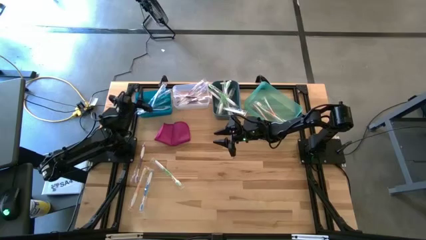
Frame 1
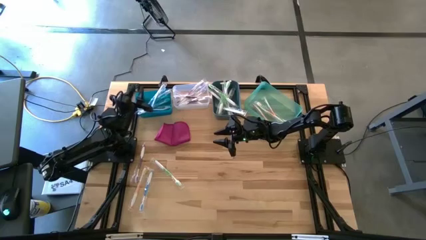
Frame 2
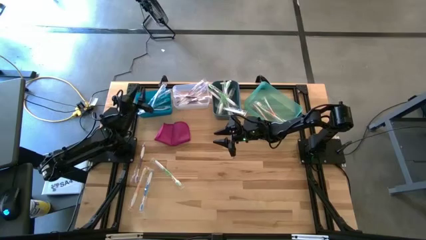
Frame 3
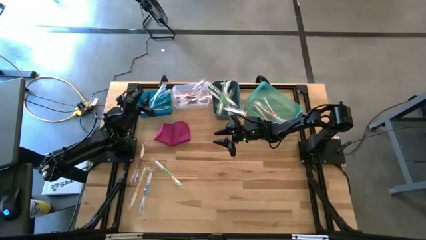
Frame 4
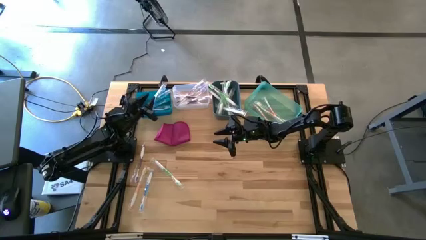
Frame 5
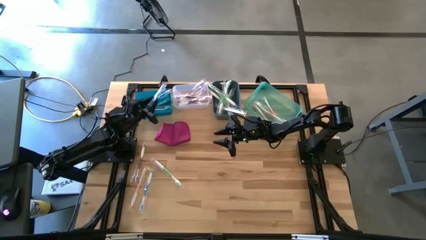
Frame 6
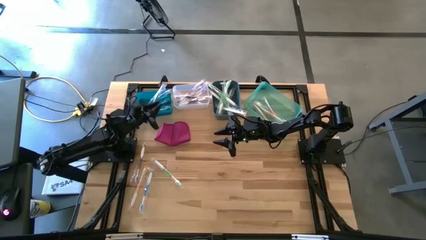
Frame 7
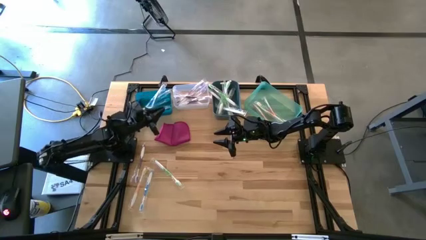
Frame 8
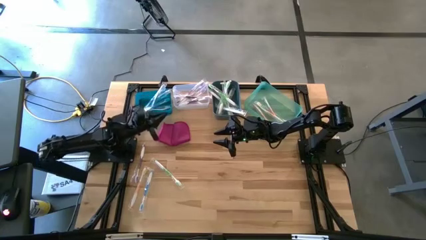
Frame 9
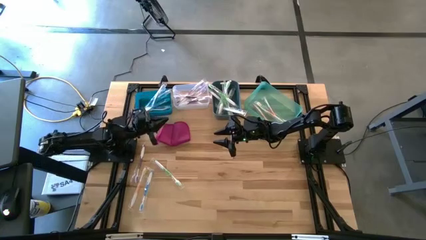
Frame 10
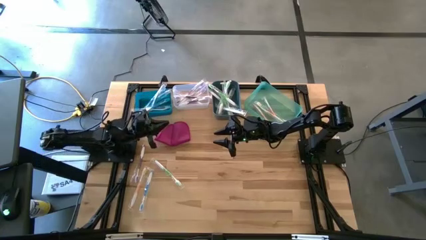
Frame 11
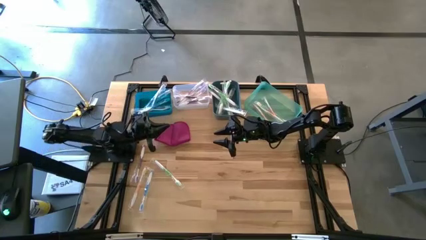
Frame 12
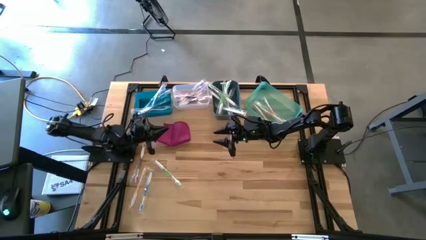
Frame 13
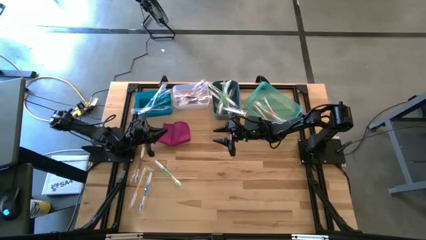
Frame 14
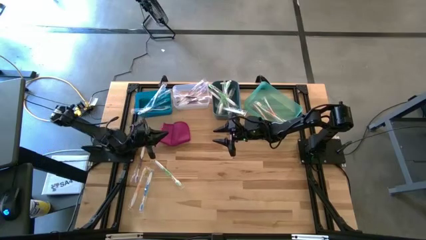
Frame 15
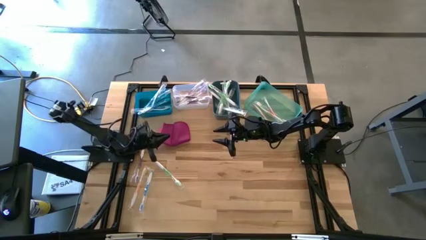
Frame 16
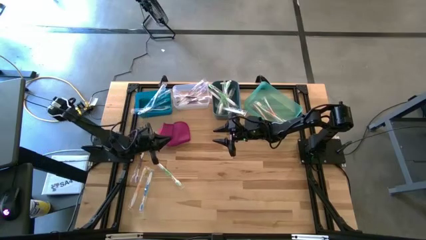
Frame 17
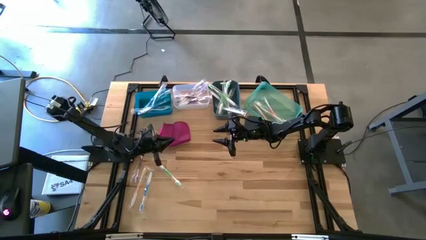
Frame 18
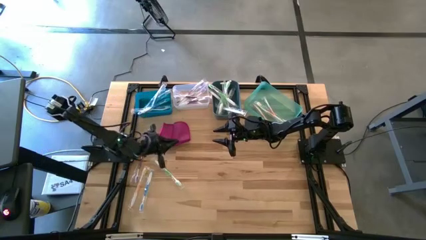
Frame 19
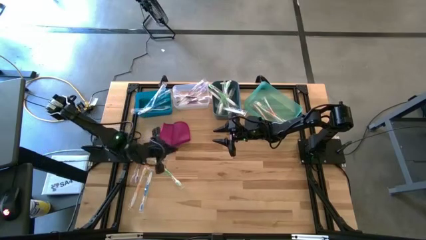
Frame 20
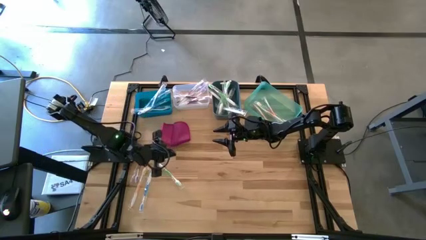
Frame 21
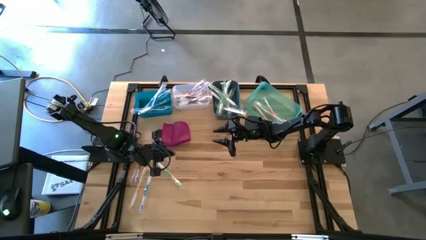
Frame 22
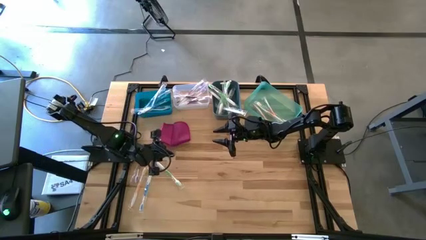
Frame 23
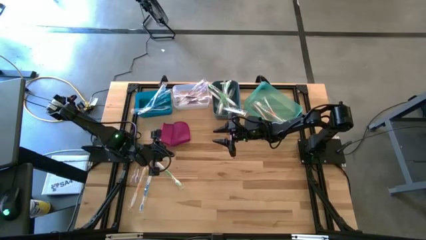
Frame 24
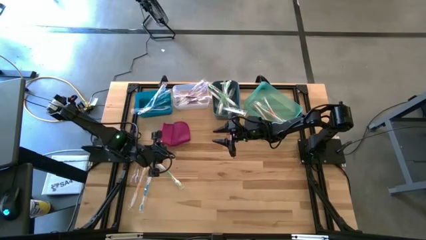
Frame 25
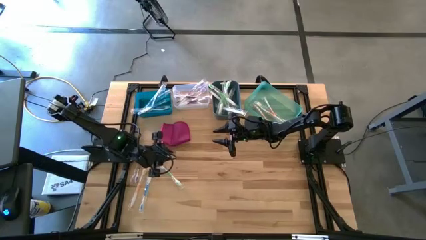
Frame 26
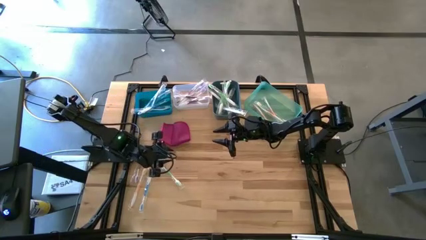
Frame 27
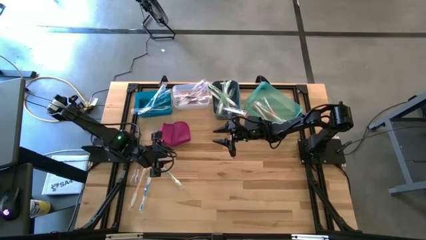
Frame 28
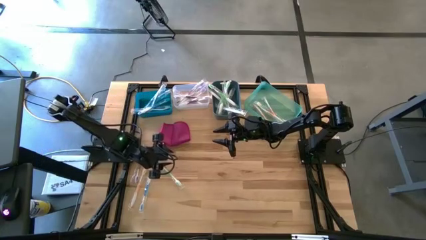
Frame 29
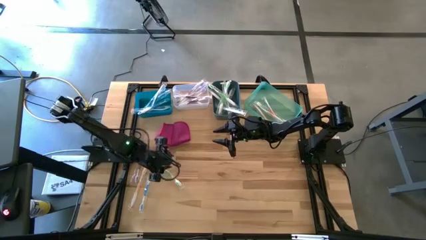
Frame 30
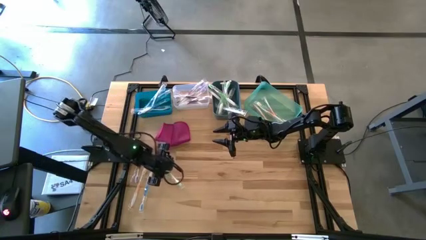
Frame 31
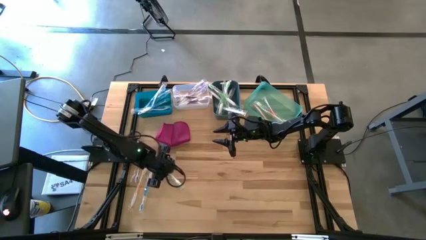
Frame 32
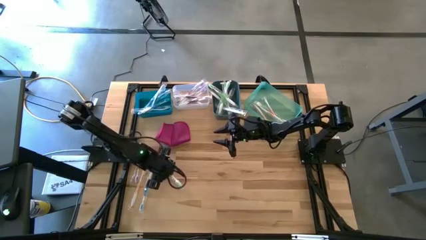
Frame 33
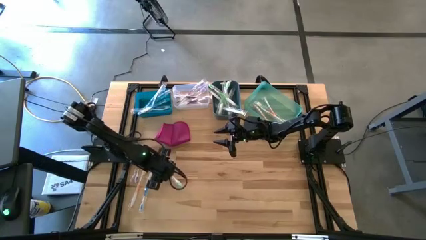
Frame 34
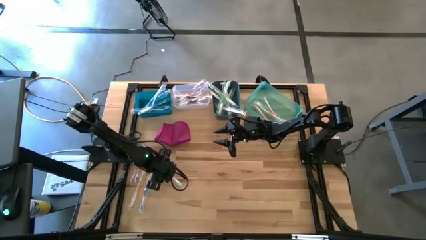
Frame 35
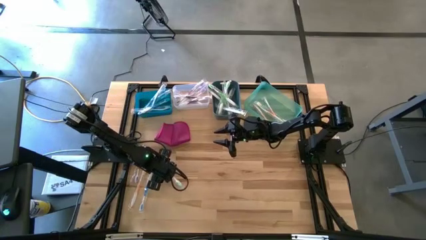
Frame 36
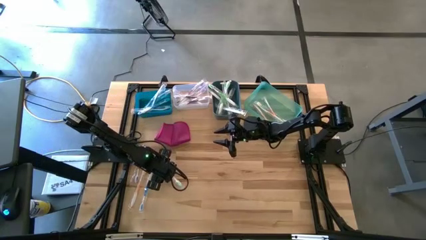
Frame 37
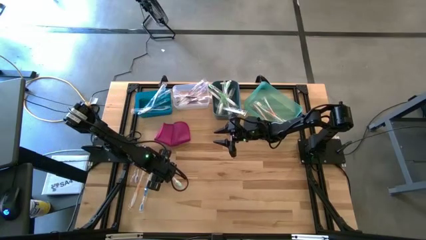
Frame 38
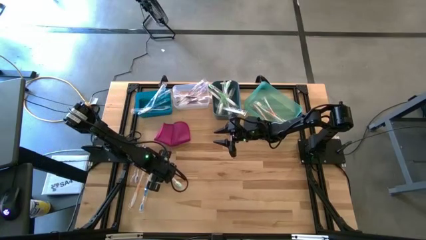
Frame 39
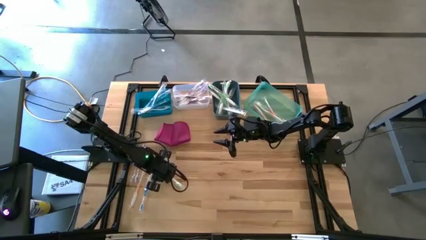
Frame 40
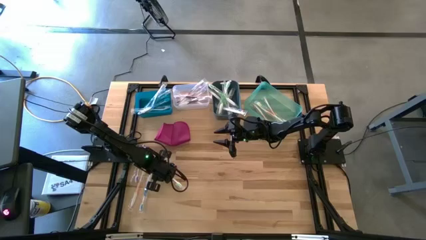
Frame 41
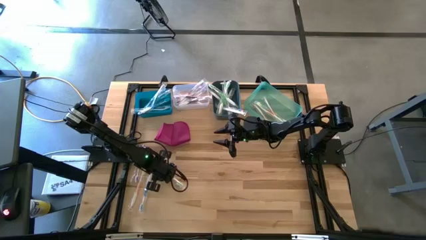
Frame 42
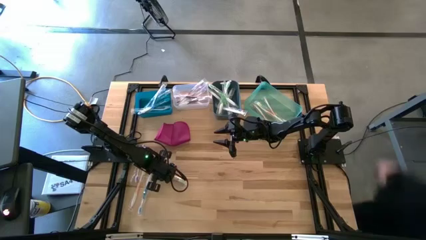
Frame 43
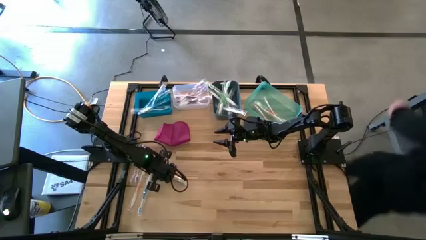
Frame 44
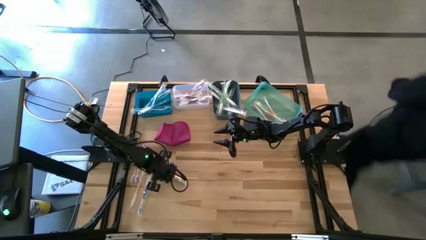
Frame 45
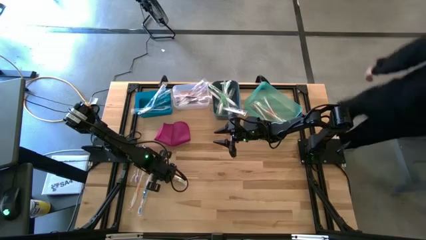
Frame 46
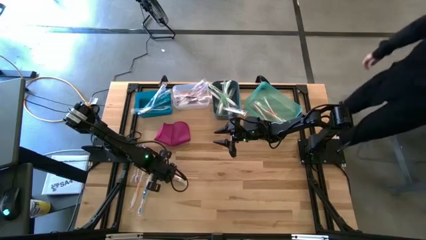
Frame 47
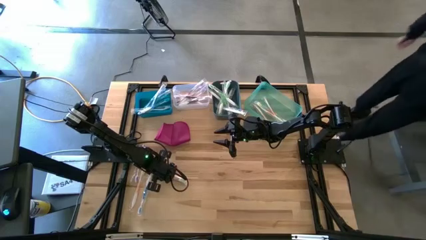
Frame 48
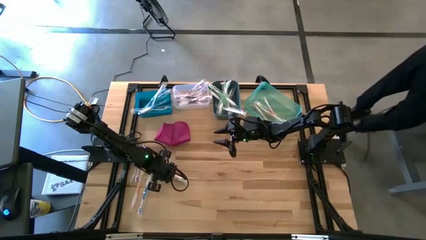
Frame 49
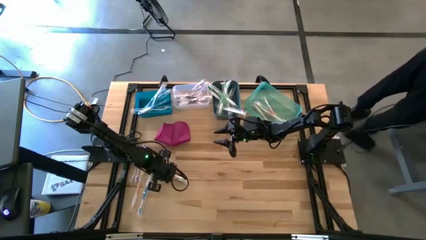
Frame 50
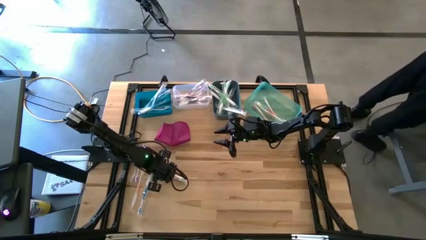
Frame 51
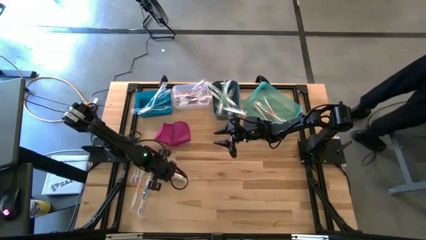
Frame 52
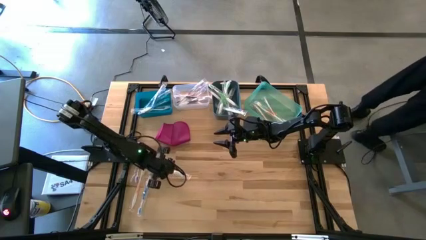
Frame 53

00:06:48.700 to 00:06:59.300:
Task: Pick & Place Toothbrushes
Put the green toothbrush into the dark blue bin

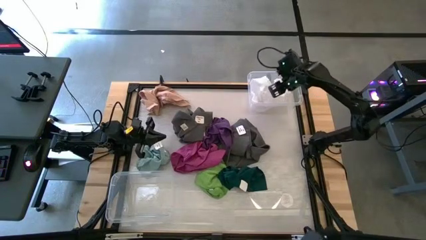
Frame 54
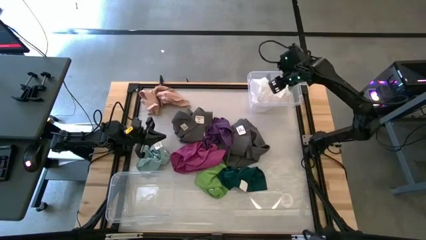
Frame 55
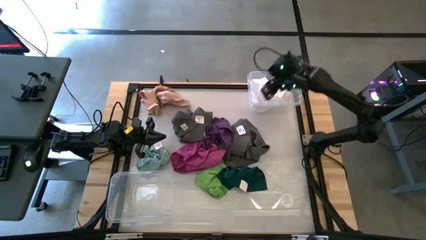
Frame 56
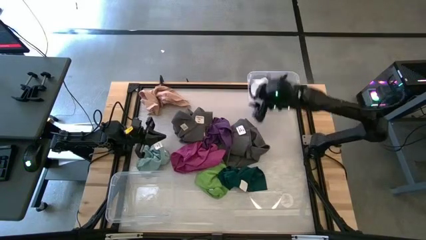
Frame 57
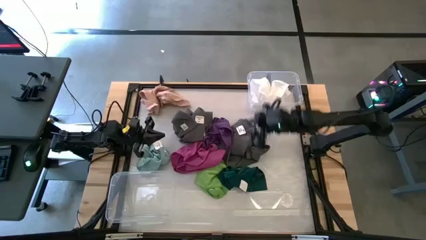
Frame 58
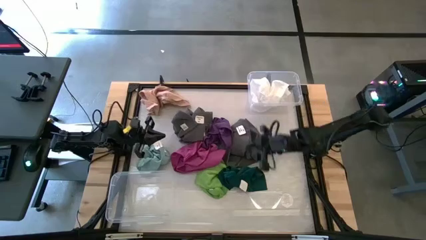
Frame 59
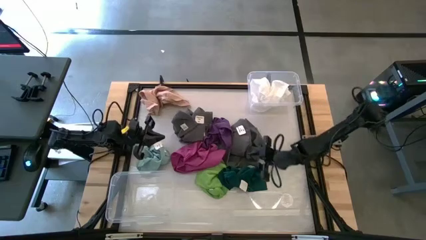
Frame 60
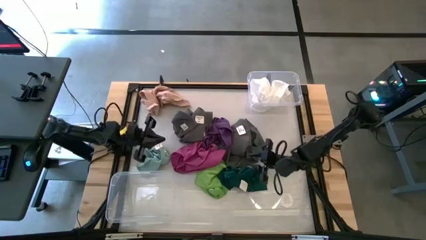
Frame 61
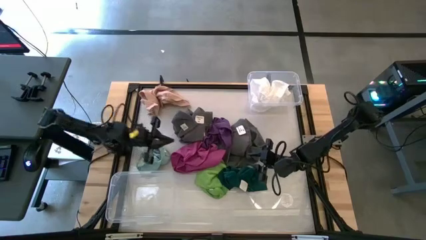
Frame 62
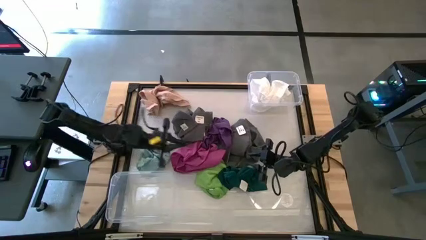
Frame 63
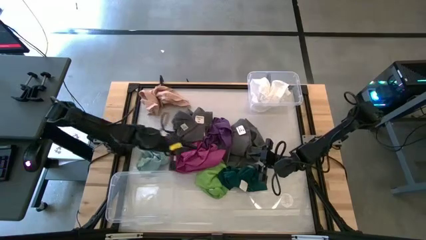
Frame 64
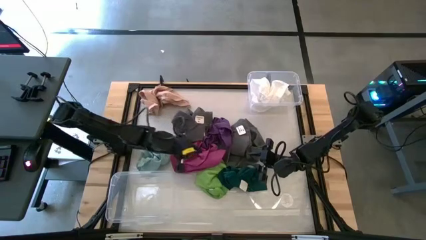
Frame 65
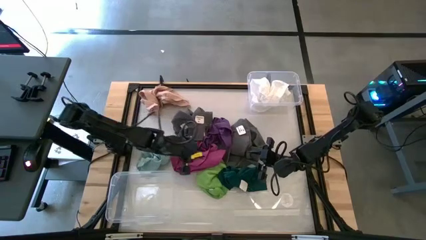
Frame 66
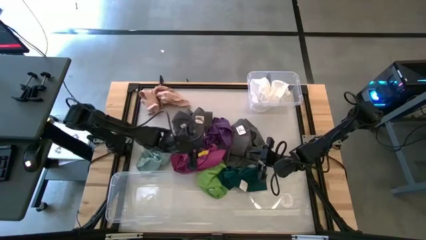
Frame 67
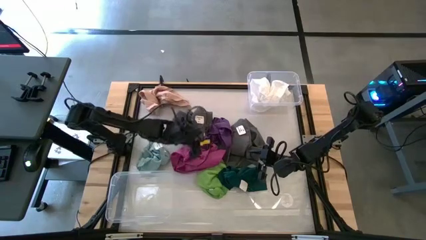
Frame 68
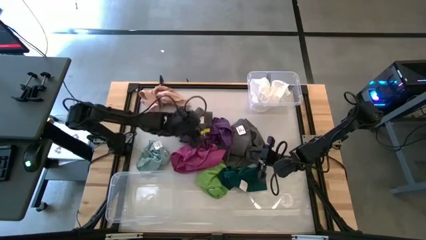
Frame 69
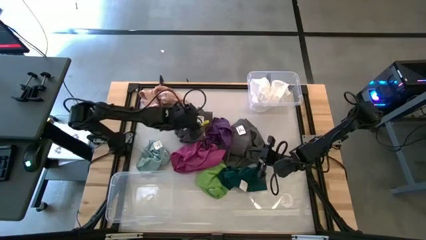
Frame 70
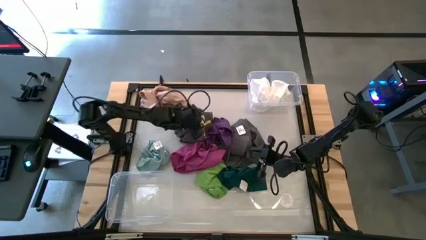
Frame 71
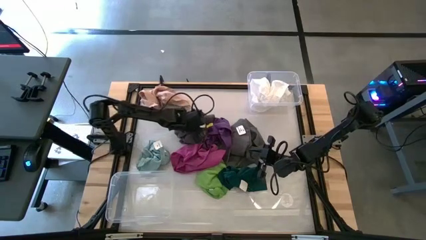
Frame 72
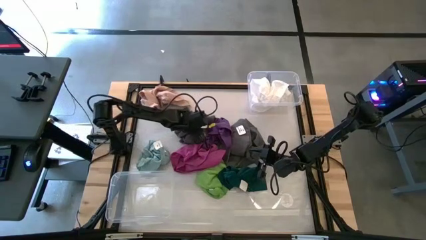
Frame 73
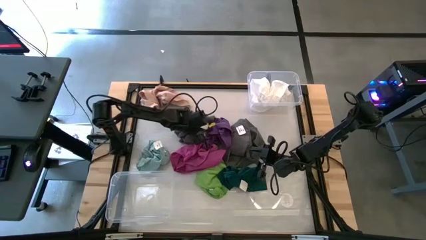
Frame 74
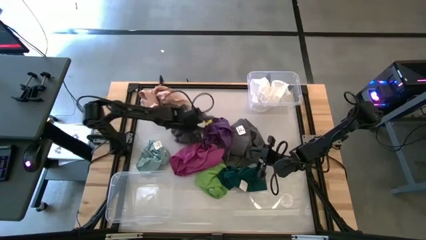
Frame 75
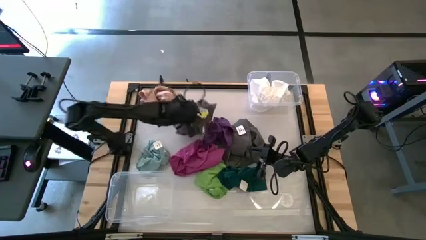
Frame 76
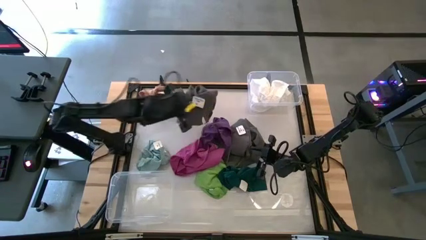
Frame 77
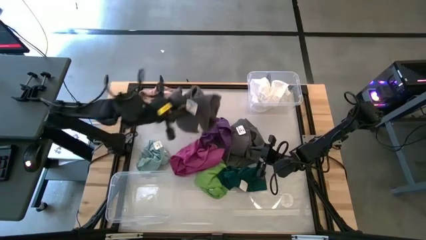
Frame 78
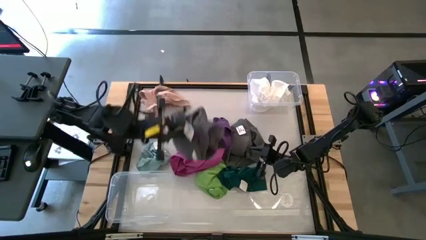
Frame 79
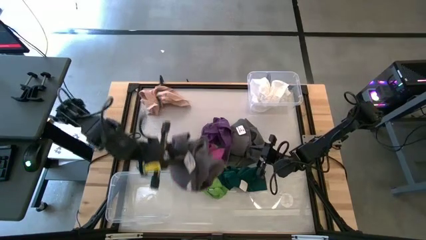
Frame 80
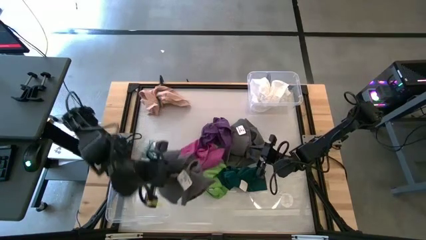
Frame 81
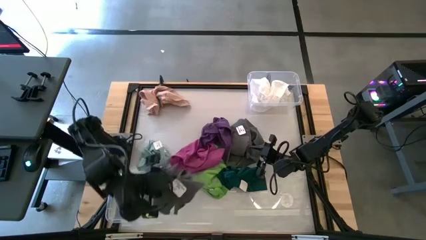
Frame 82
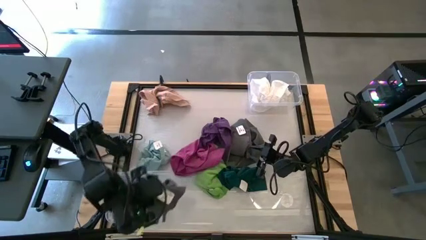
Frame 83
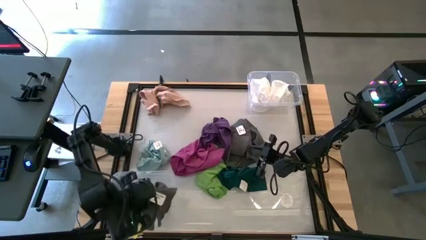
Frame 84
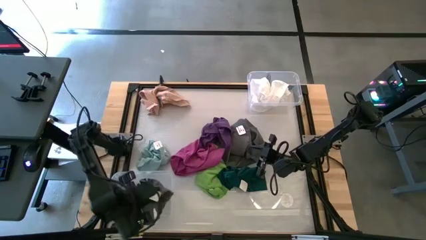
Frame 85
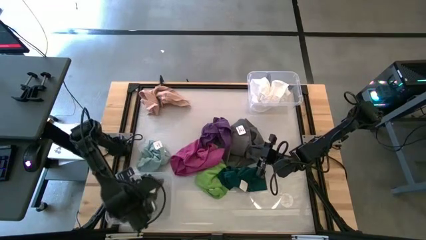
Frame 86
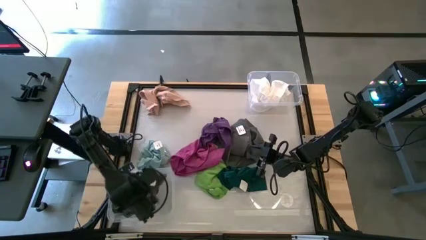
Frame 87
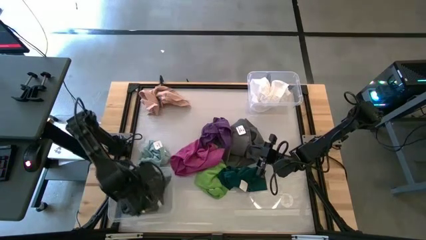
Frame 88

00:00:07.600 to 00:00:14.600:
Task: Sort towels by color in basket
Put the gray towel into the bottom transparent bin
